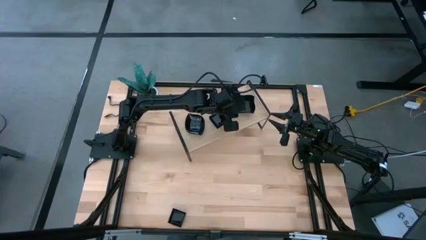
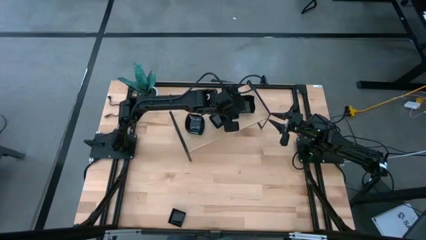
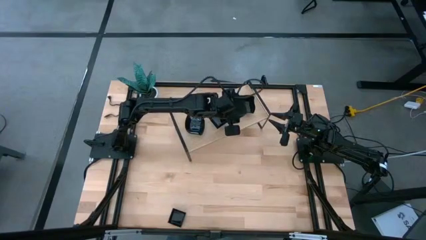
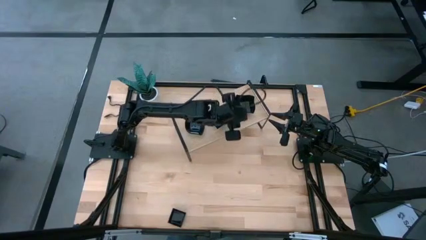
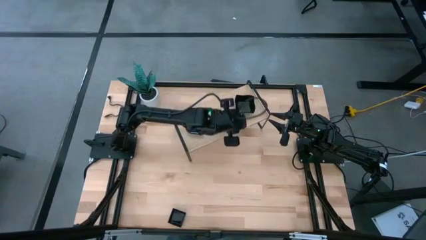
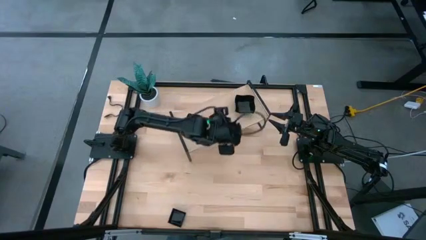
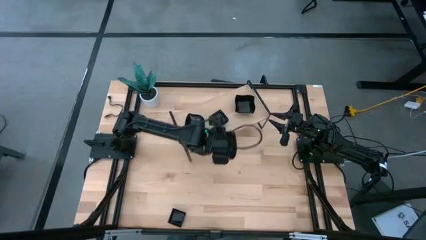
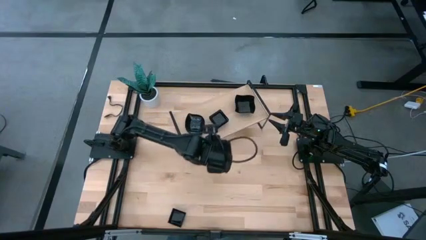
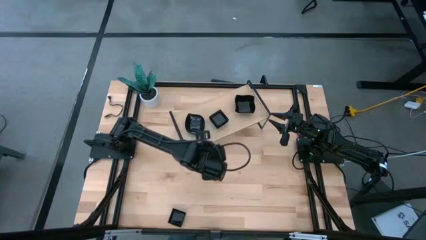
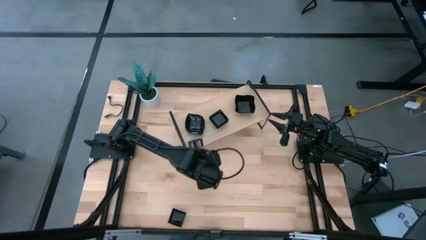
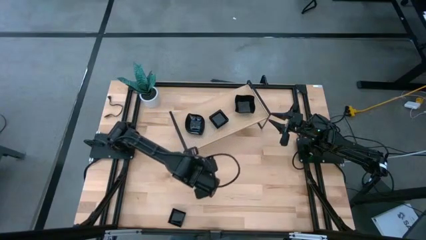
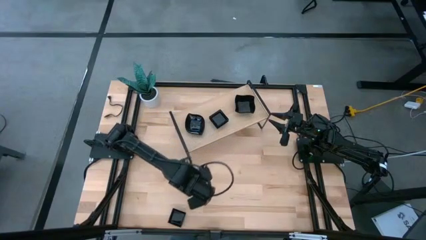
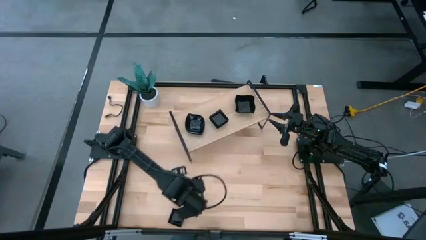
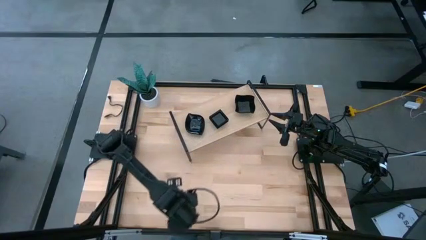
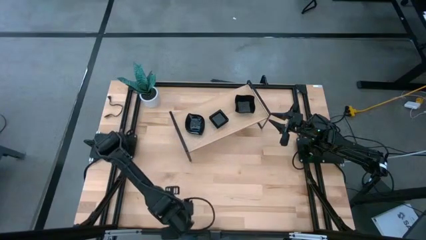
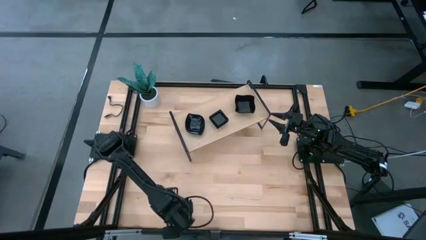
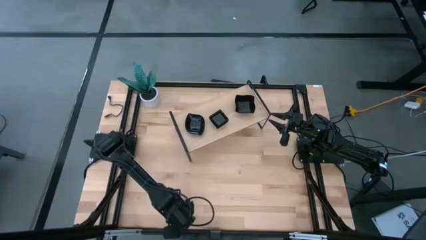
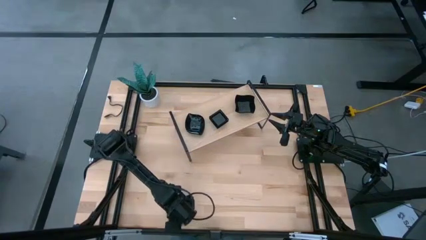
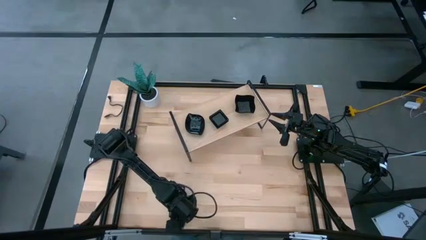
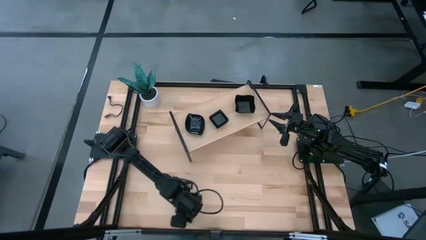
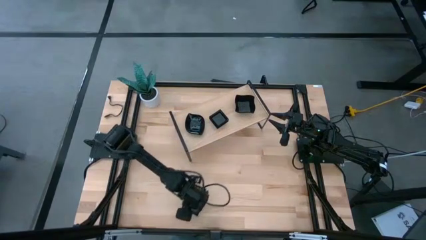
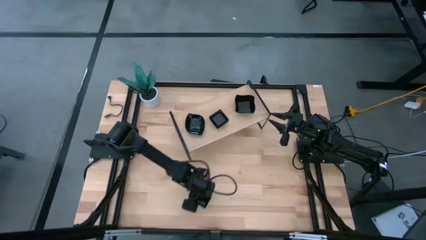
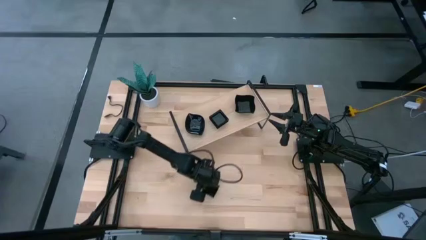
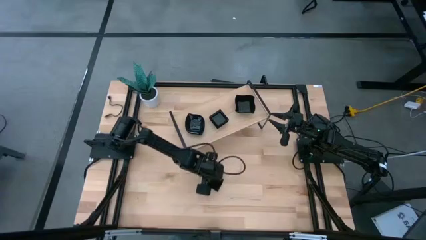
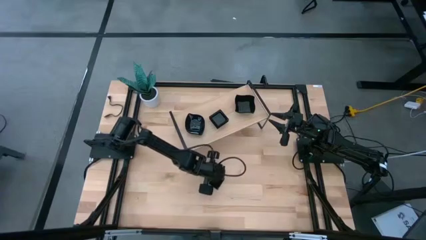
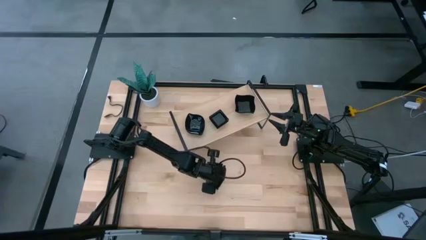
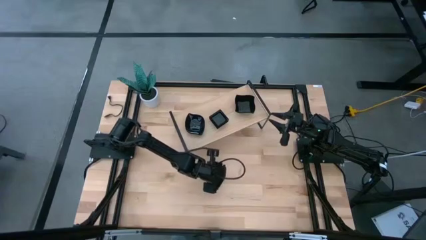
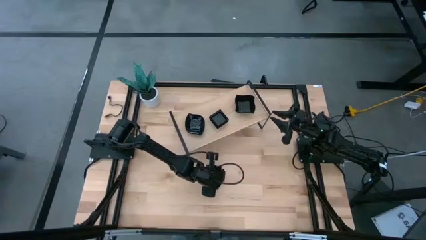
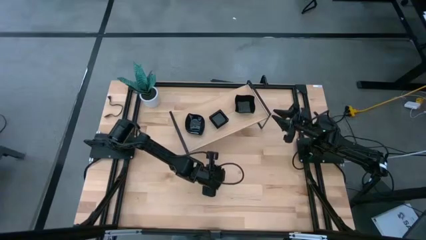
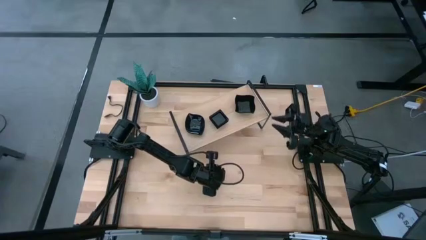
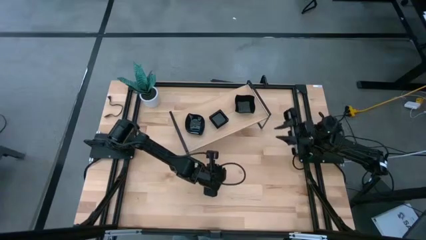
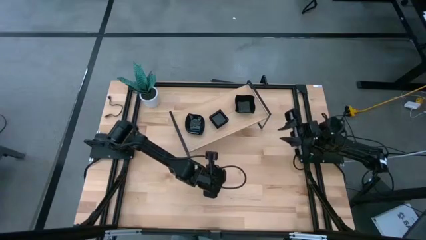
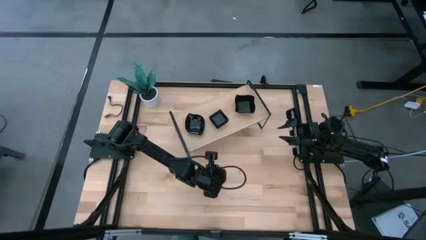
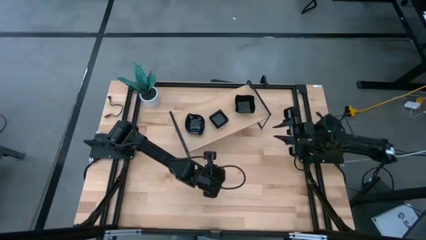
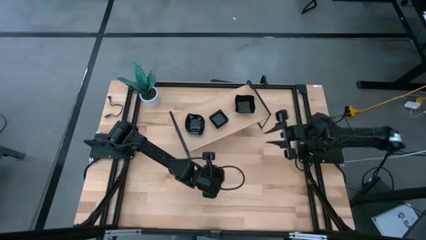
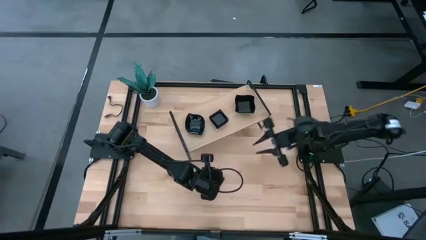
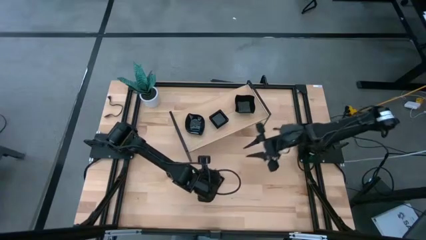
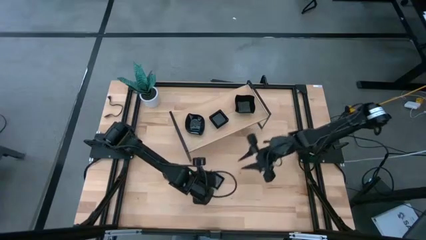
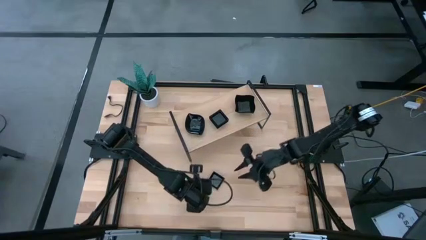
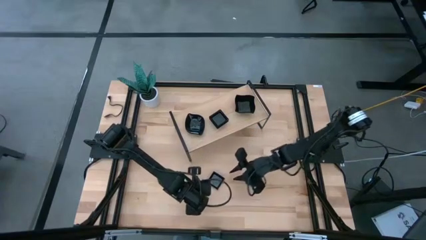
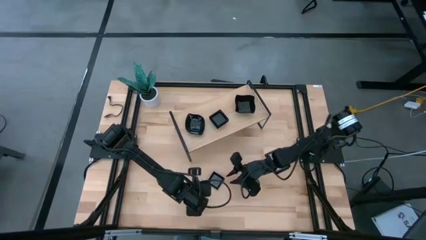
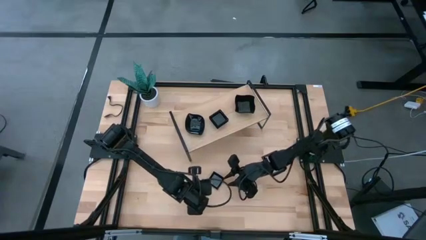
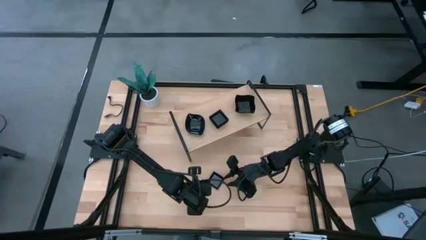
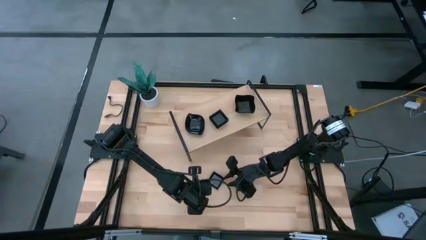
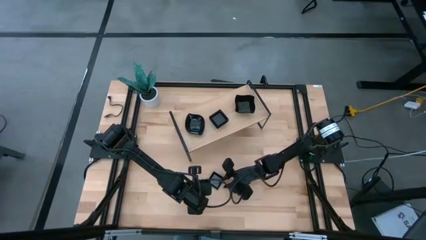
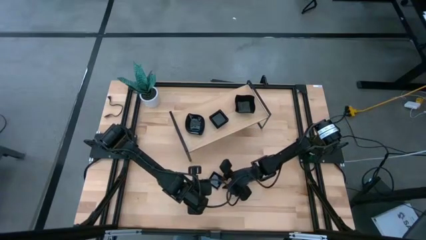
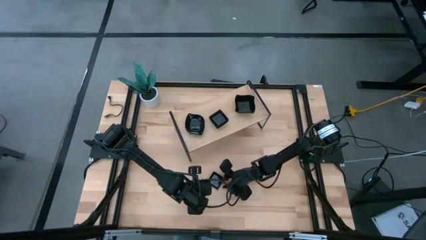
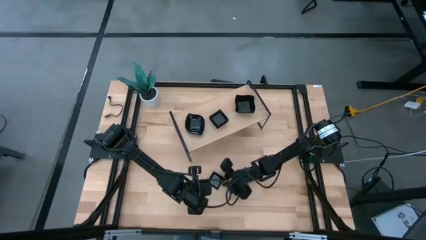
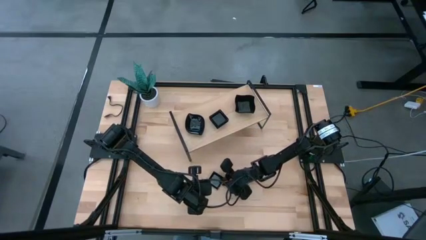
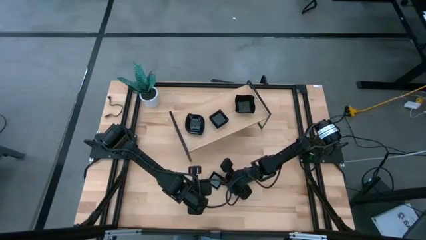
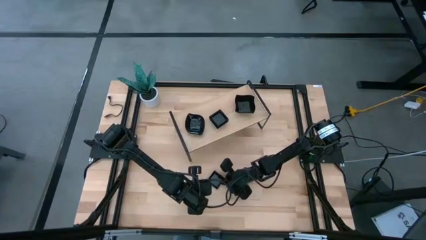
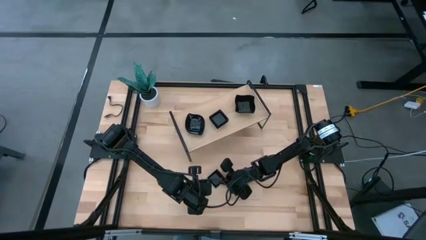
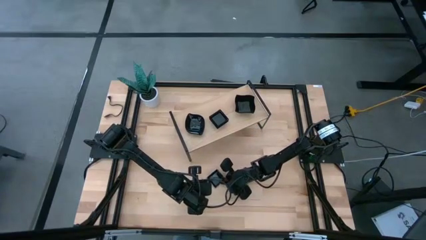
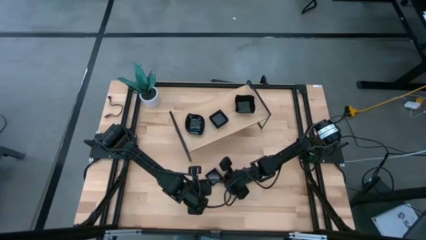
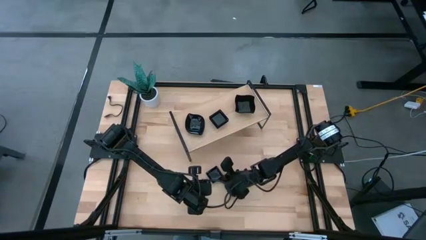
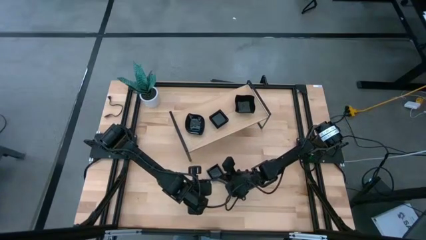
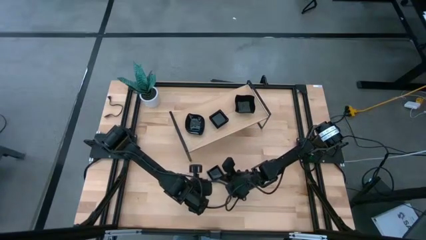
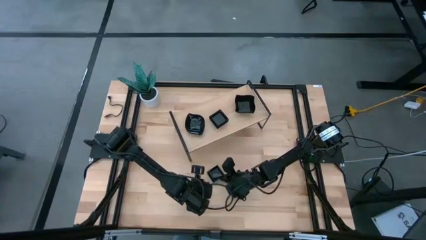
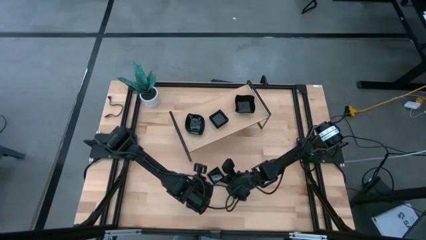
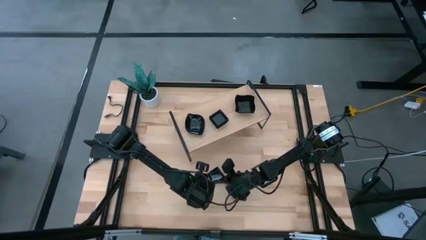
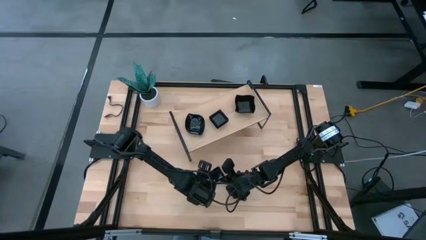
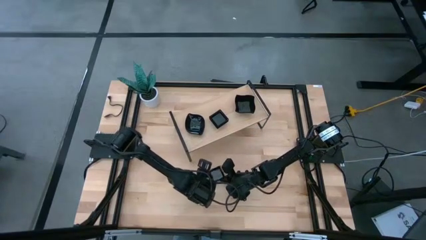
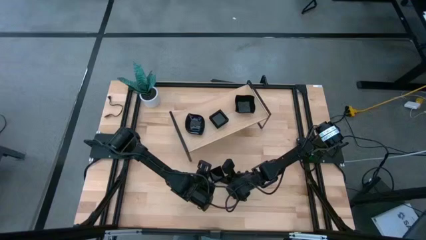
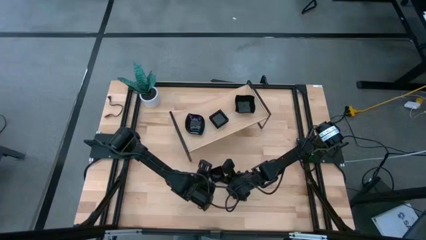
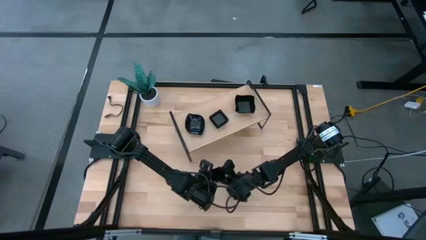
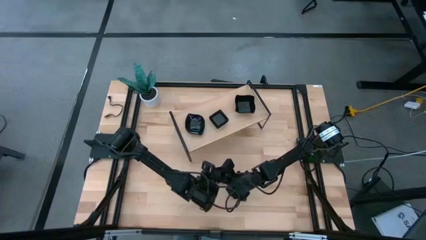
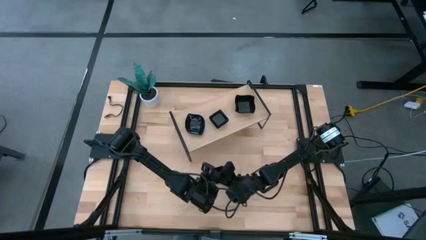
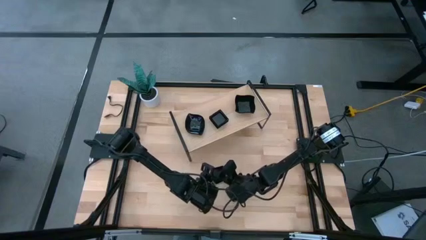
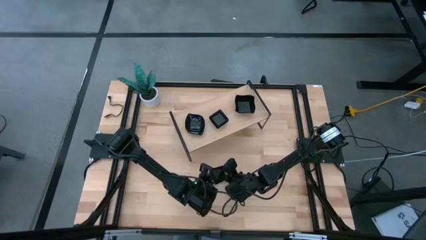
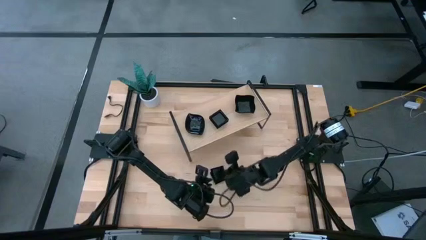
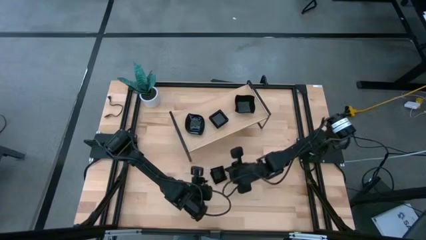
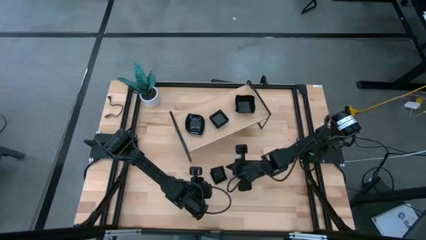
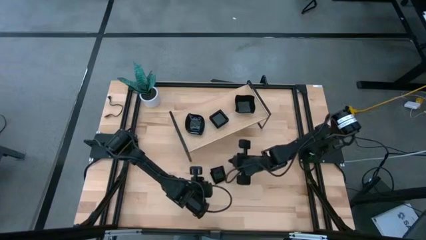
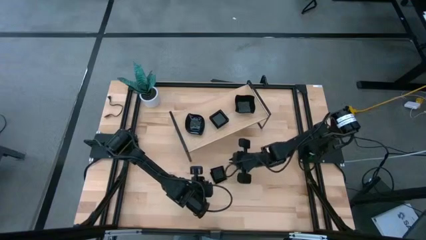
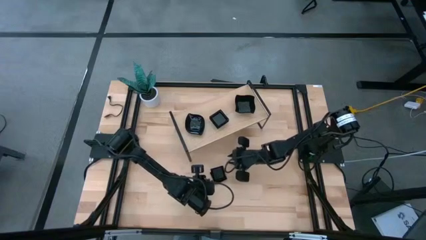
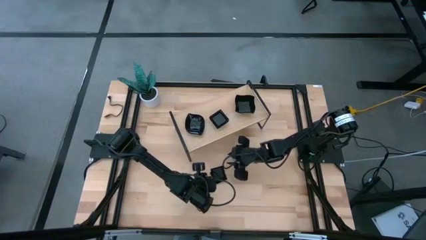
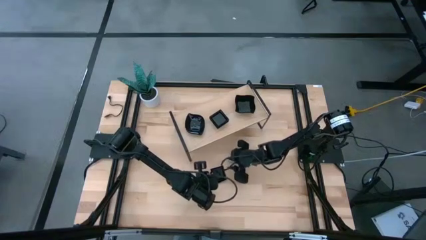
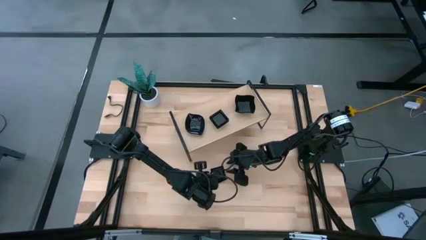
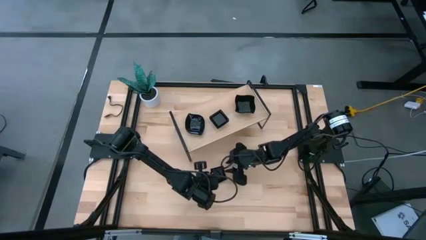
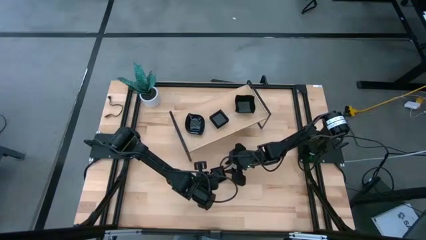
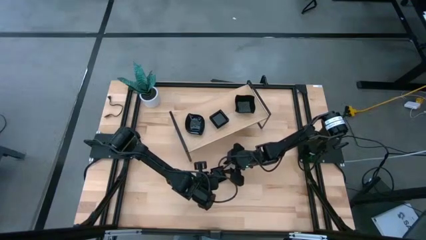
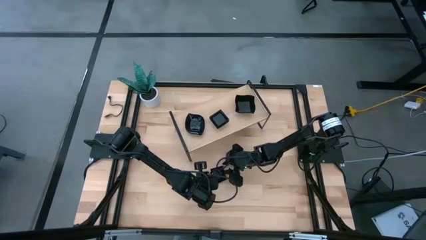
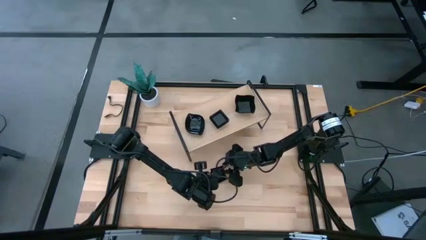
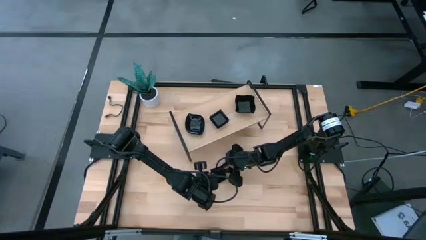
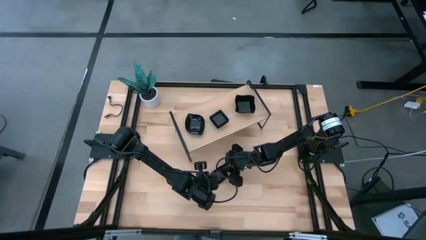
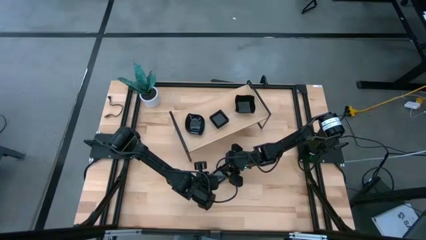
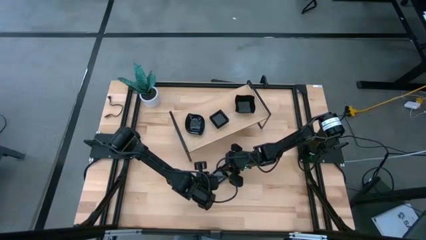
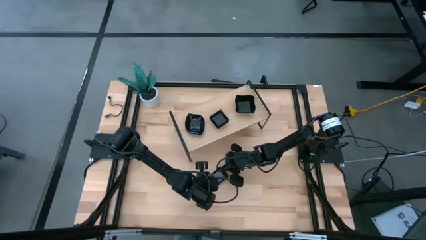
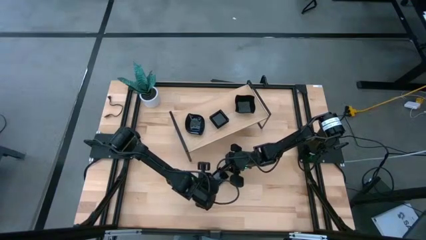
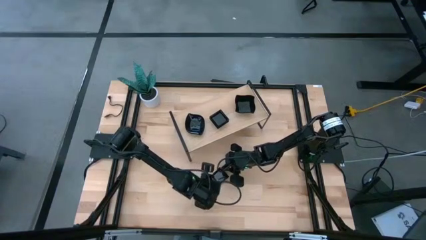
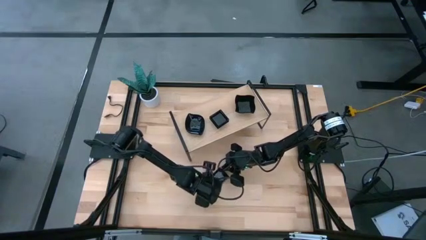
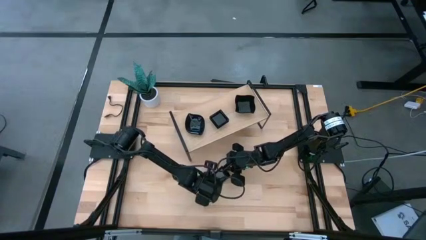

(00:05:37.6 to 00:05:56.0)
Task: Pick & Place Mini shaped plates
Stack the black square plate on top of the black square plate on the shelf
